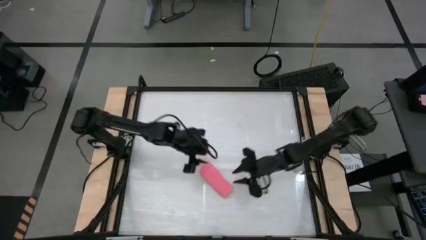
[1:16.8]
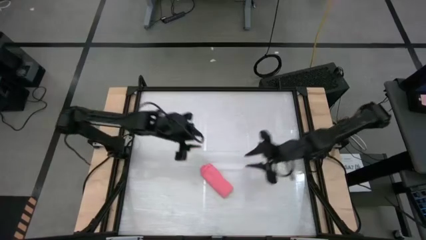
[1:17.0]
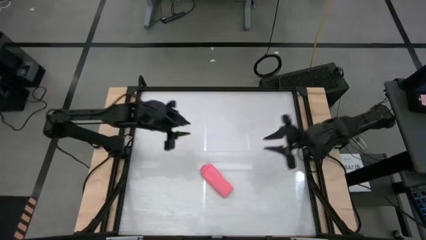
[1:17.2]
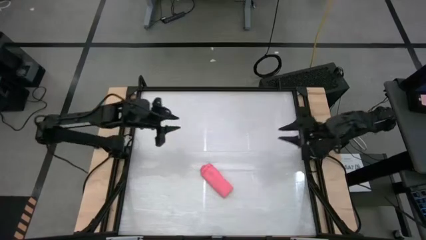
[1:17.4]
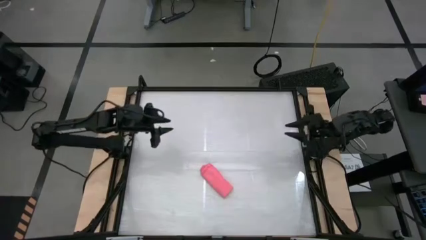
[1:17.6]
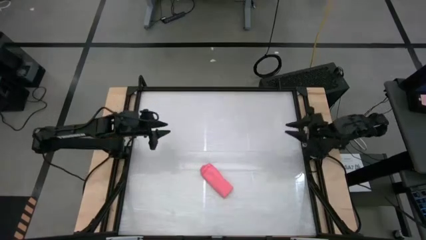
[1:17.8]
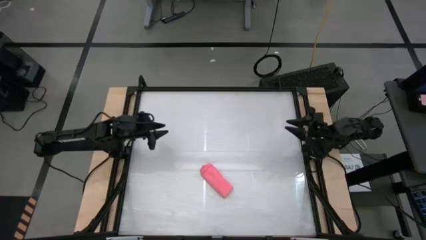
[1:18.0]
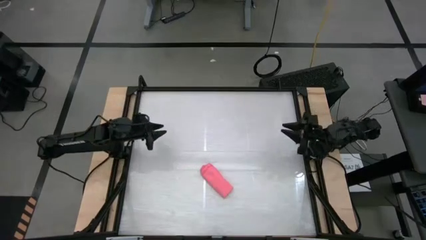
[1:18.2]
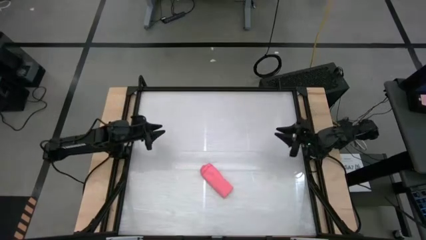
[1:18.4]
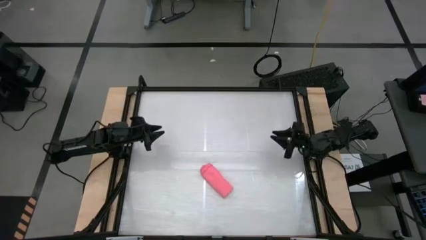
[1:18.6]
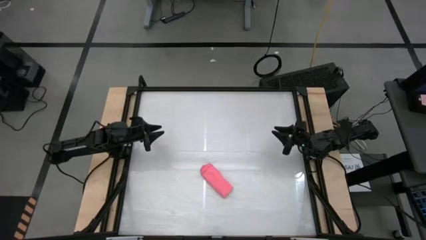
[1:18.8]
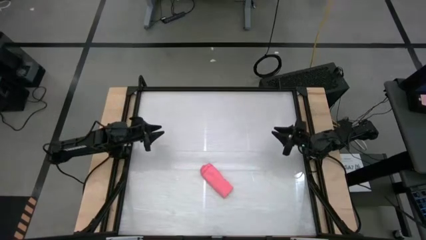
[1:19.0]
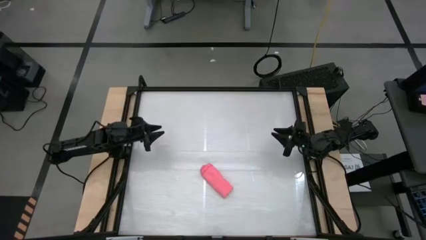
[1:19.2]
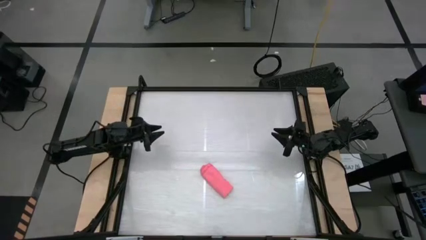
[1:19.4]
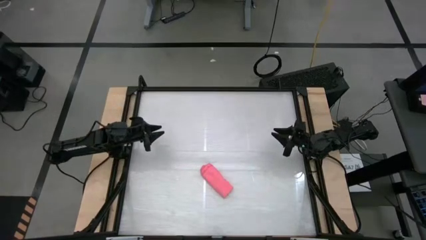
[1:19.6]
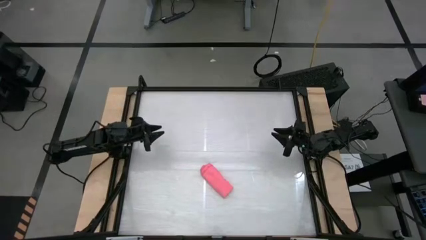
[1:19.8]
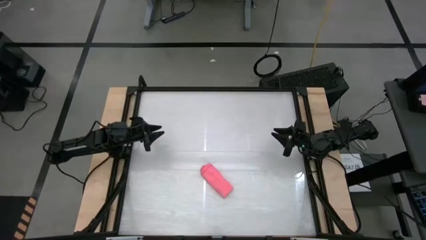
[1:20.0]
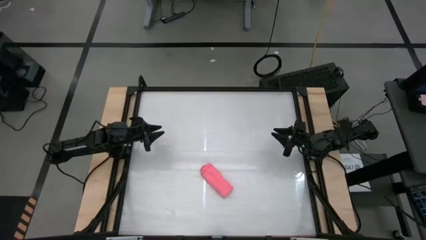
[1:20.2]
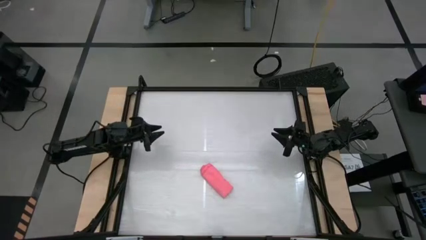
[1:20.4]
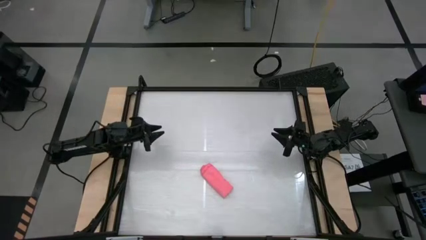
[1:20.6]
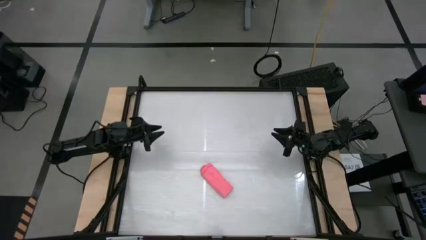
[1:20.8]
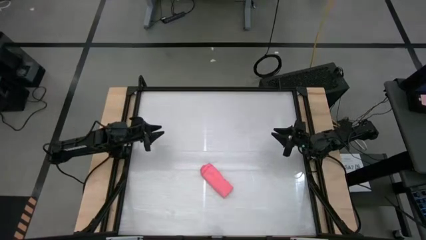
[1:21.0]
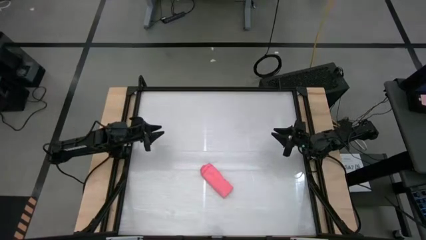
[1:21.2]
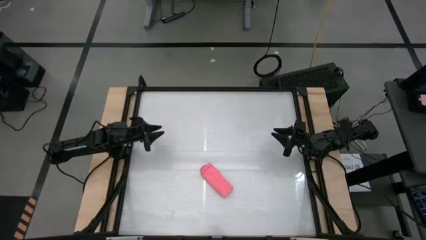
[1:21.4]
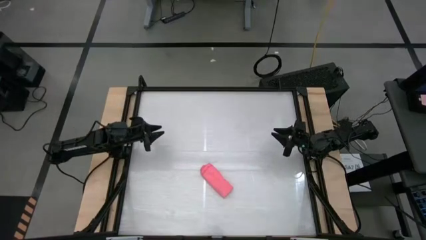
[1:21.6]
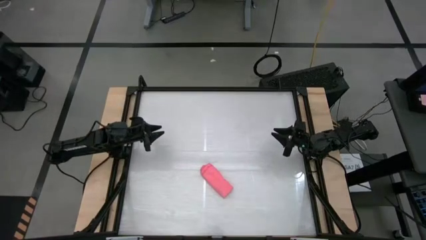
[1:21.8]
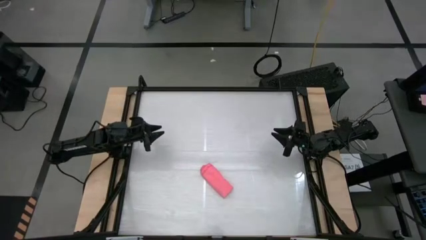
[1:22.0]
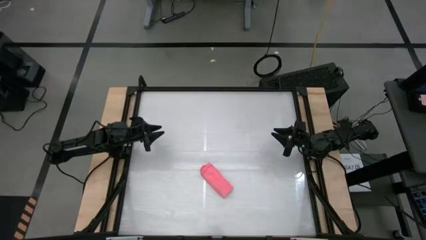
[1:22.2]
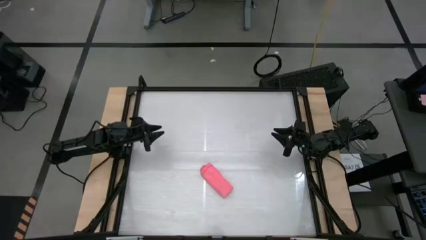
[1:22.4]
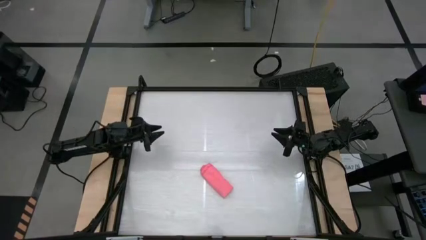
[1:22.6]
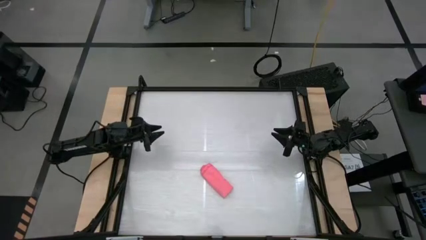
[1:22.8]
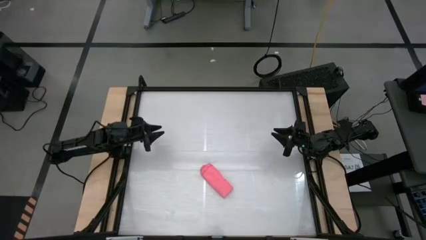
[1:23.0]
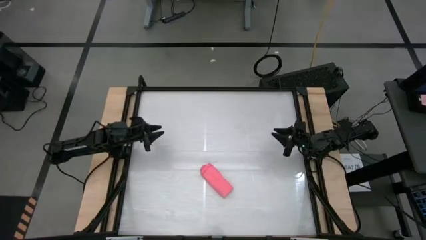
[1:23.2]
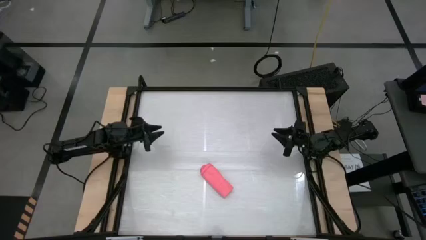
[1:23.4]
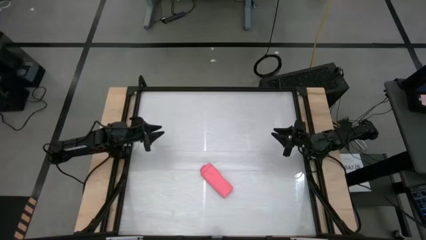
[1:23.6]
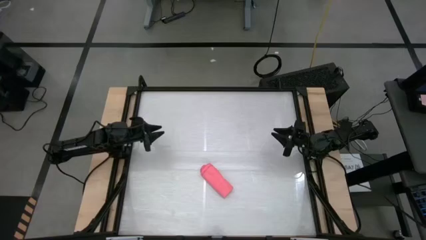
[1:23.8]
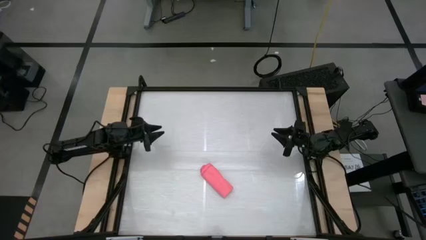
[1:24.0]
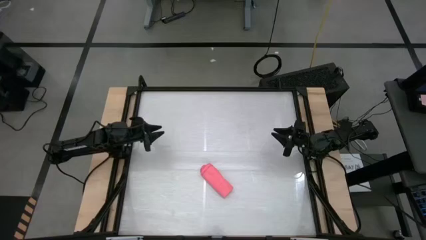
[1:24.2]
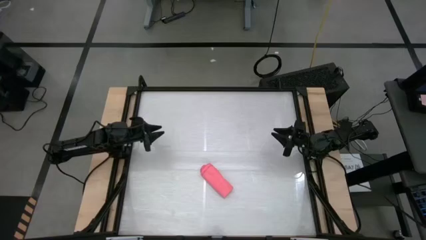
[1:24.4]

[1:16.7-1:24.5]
Task: Roll towel
Return to Home Position

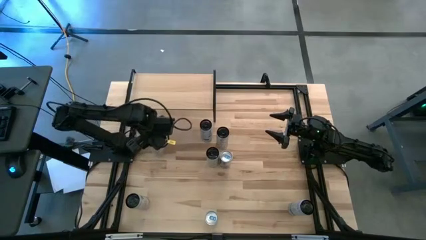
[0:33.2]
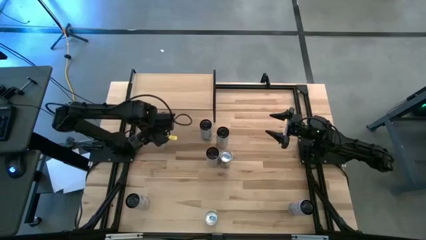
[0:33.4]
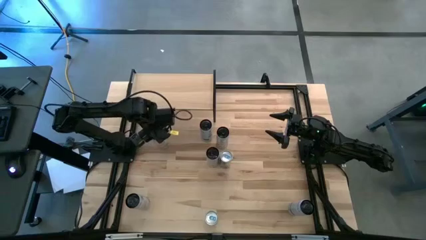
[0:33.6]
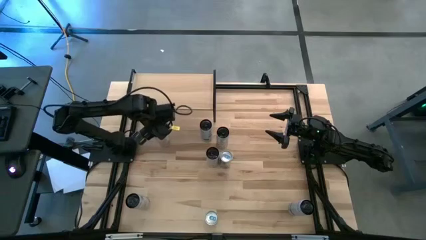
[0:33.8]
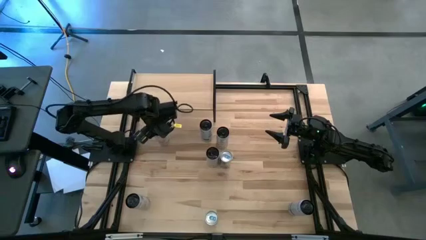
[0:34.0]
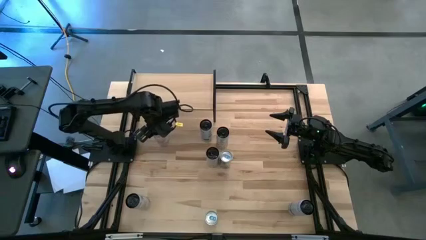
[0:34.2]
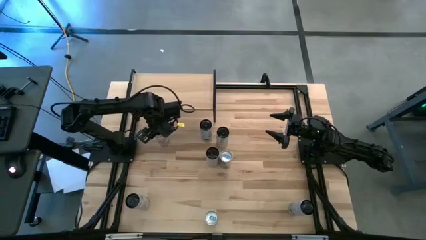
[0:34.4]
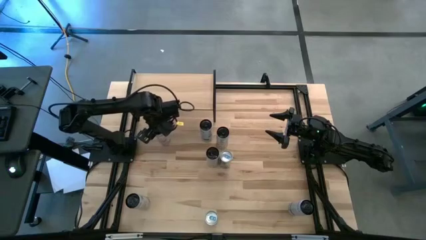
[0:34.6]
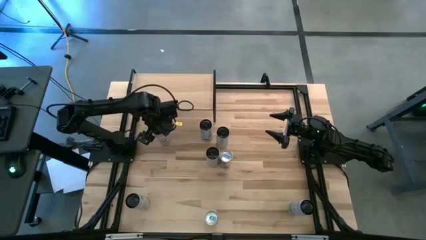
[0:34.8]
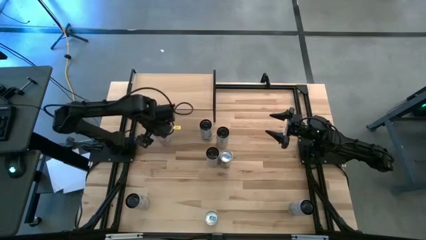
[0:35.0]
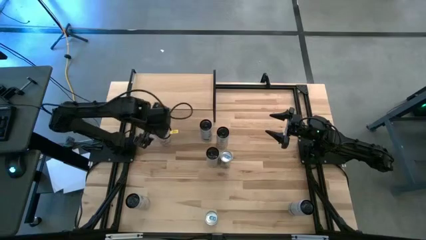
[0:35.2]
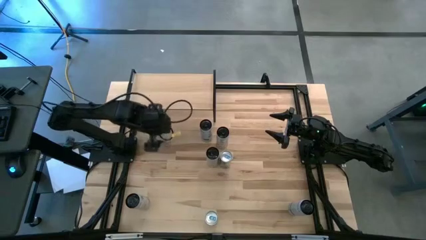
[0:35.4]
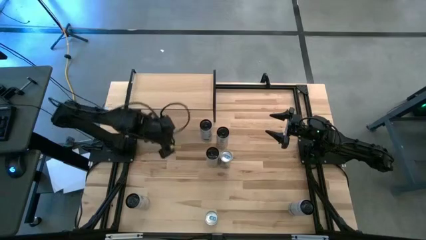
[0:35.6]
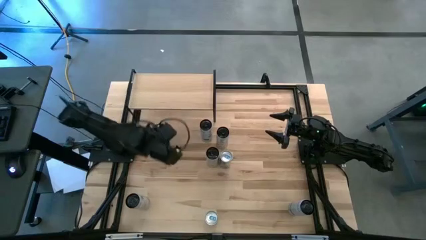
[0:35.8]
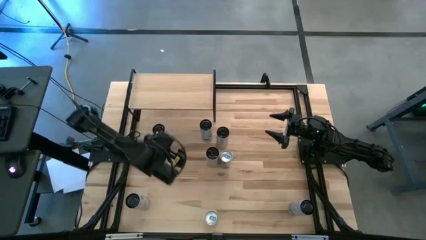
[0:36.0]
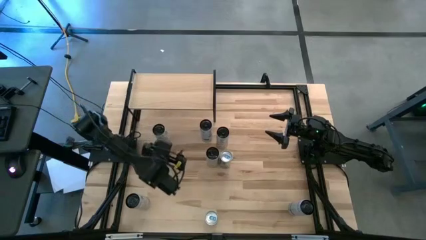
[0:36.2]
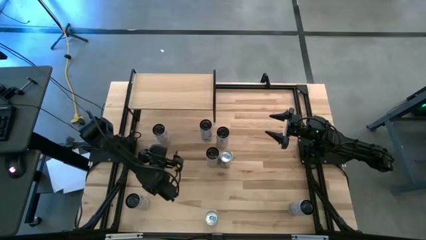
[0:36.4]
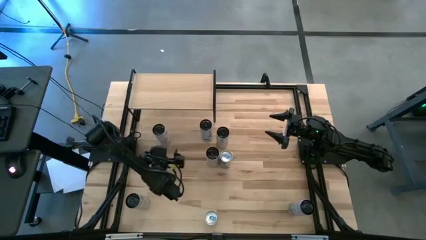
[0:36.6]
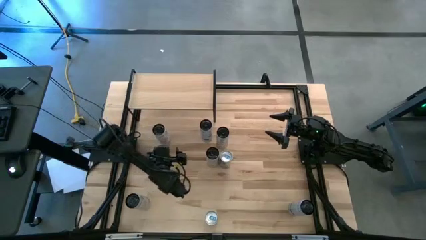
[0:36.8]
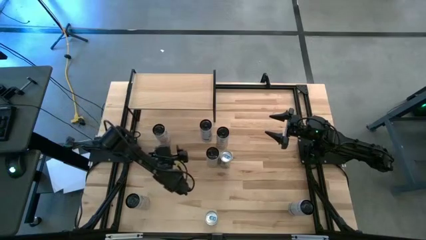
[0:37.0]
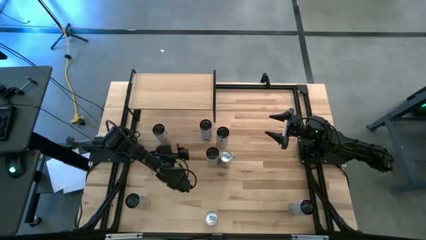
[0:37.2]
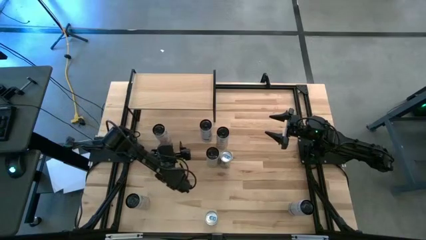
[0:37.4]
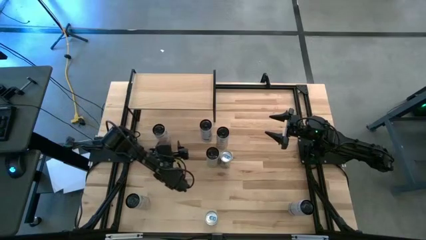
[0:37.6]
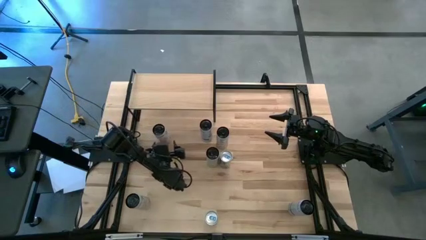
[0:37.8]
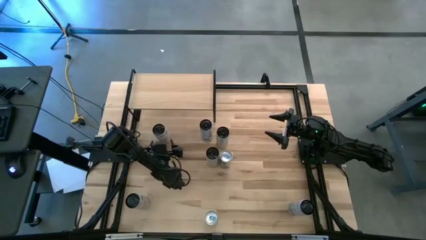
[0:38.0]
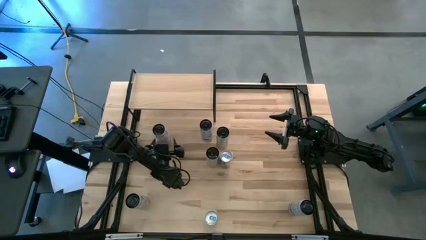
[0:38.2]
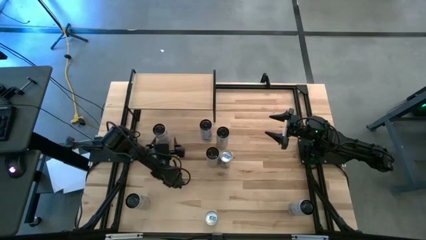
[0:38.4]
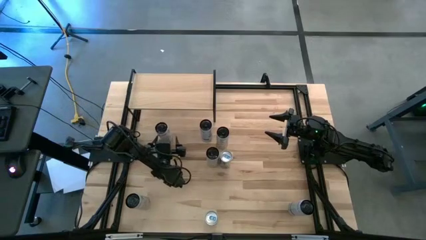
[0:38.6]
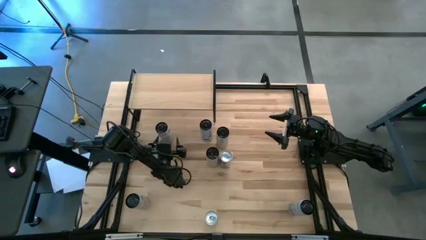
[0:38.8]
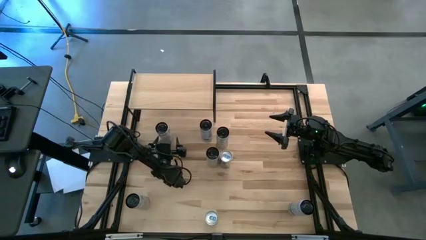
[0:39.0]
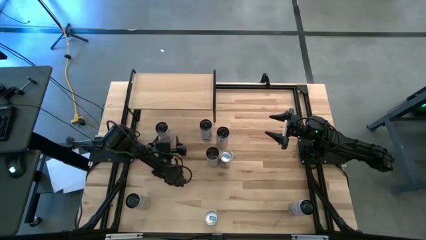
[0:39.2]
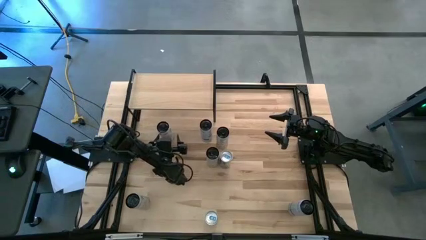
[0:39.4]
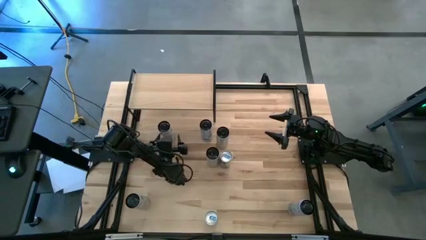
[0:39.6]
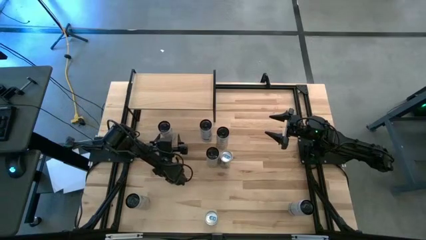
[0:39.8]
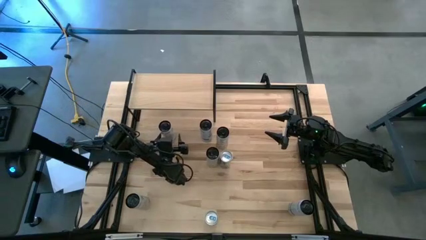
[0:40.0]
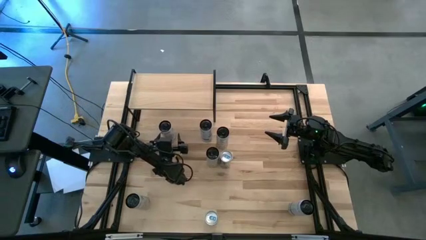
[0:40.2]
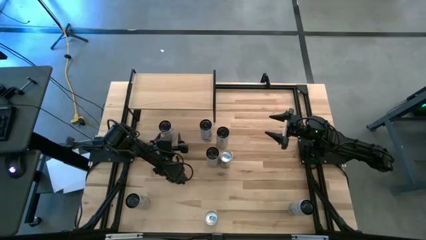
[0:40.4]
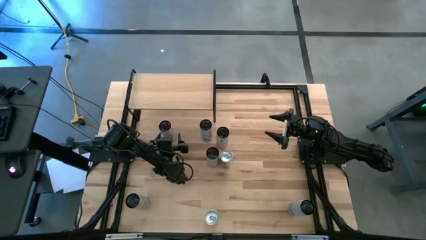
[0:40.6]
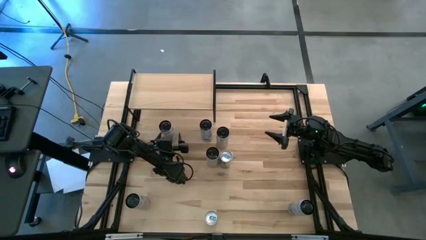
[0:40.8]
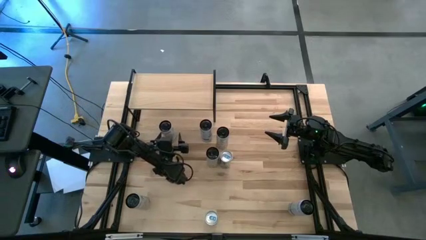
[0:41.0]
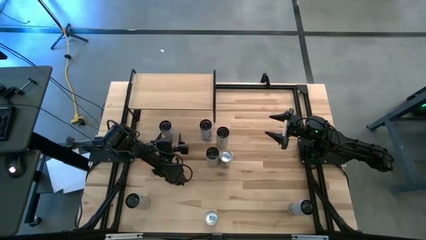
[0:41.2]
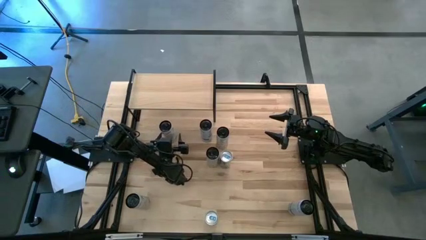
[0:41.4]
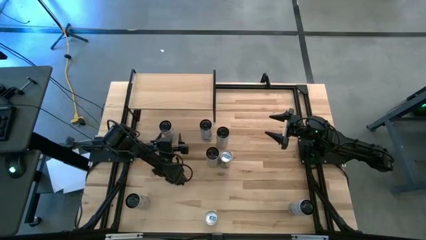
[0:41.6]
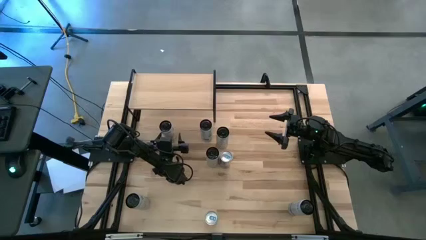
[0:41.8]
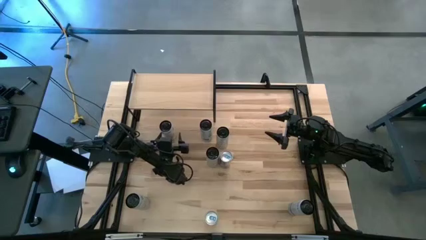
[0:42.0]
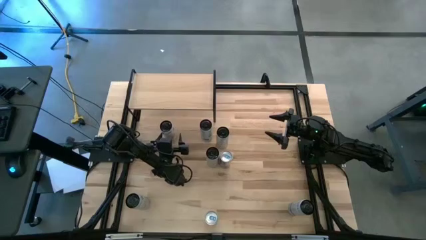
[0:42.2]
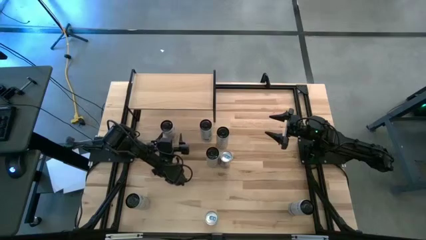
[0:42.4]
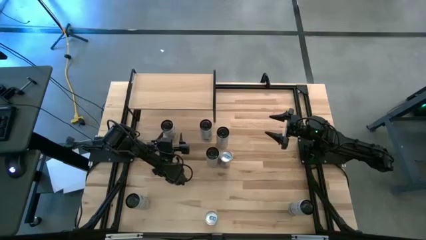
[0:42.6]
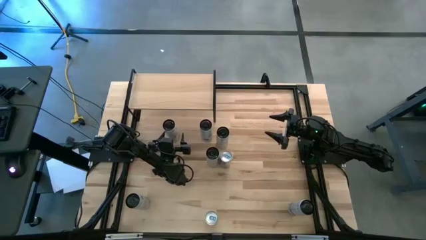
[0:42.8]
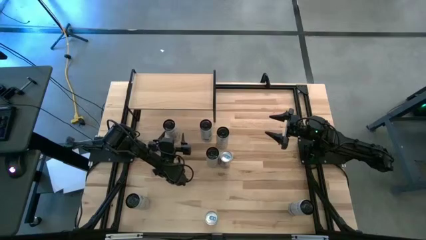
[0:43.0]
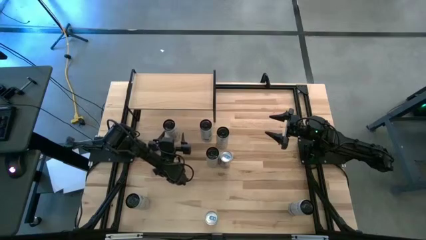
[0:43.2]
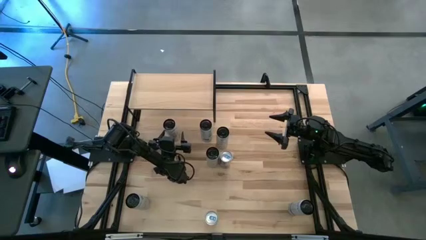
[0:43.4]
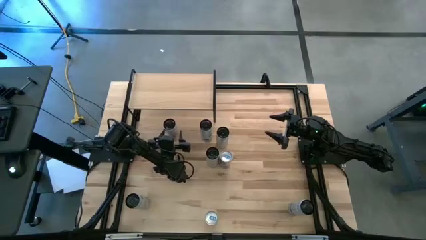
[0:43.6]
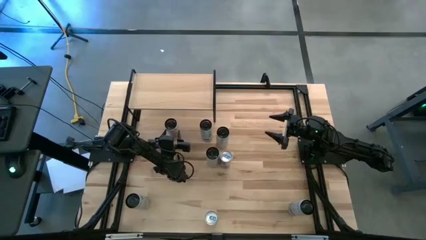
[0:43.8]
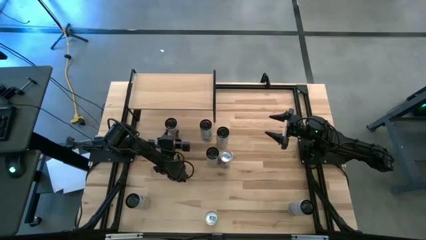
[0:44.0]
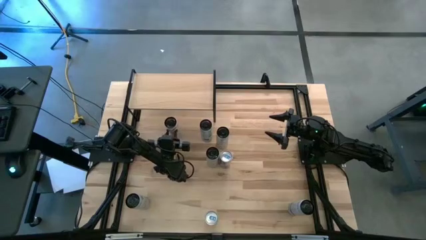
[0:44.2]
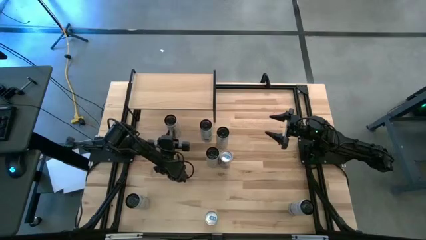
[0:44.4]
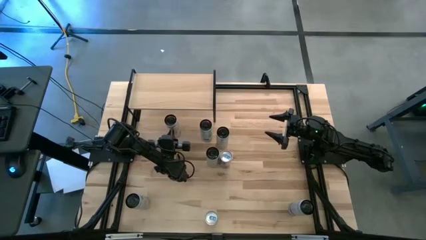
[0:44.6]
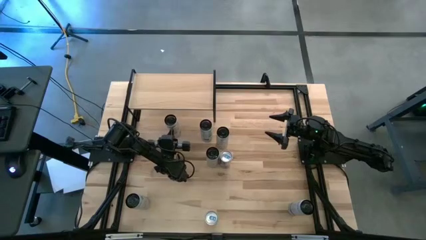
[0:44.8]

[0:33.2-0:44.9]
Task: Place canned beverage on shelf
Put the top white pink soda can on the shelf
